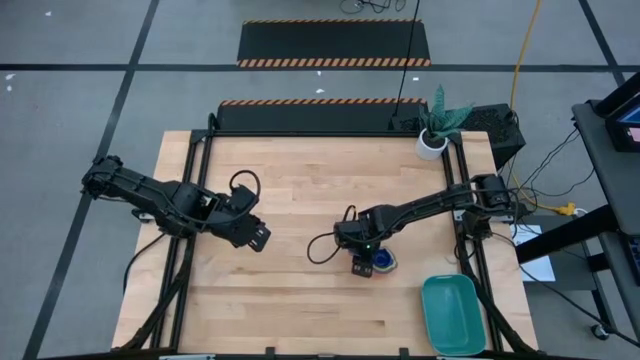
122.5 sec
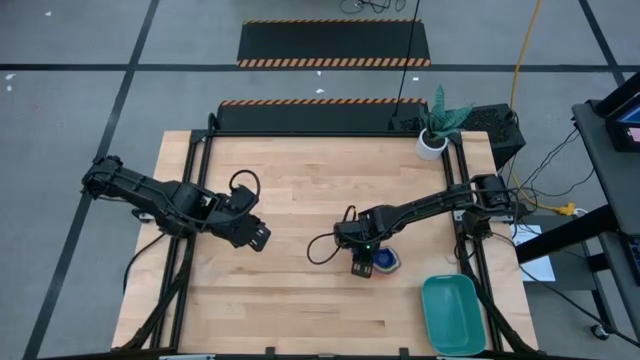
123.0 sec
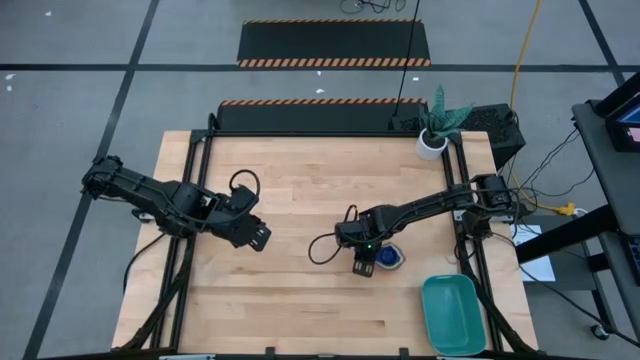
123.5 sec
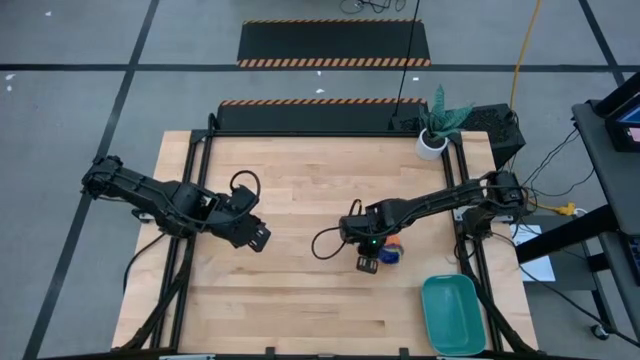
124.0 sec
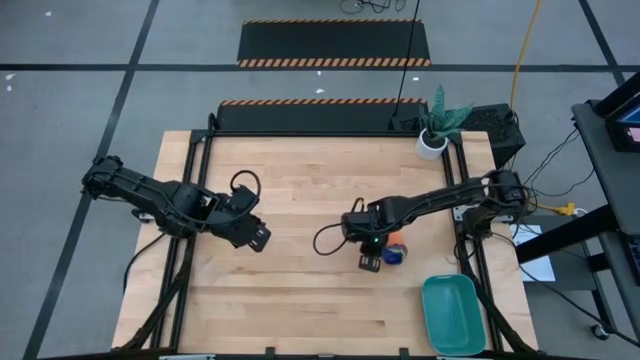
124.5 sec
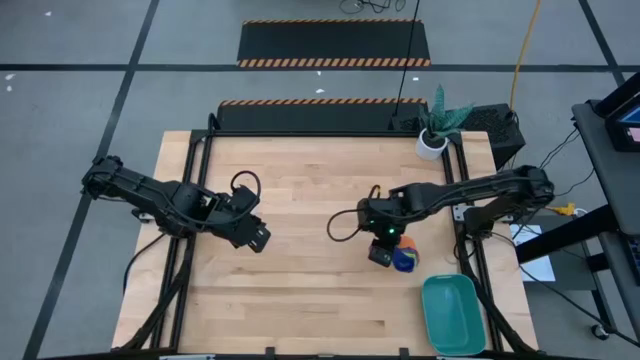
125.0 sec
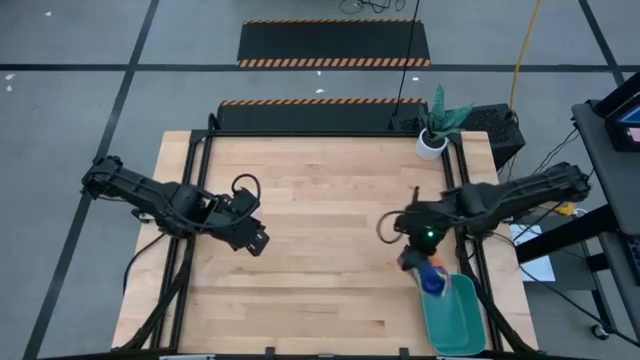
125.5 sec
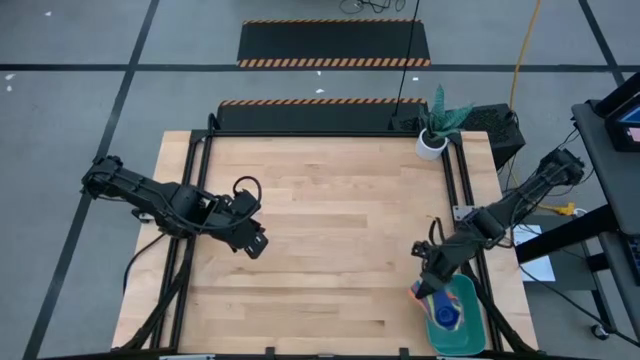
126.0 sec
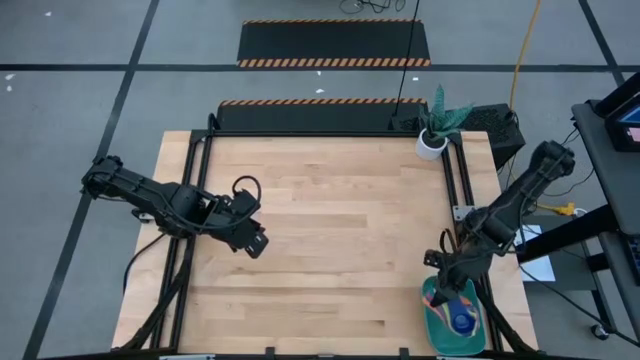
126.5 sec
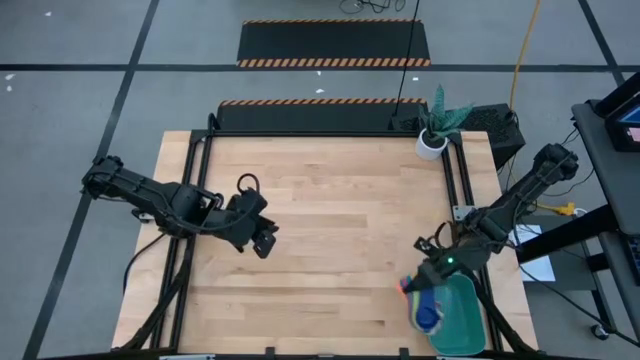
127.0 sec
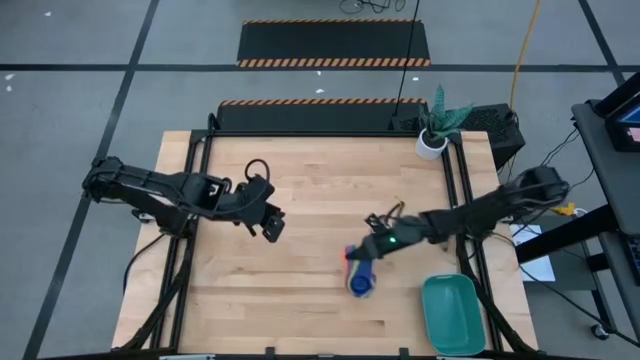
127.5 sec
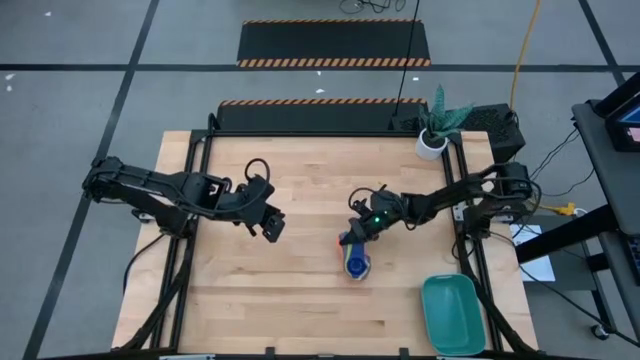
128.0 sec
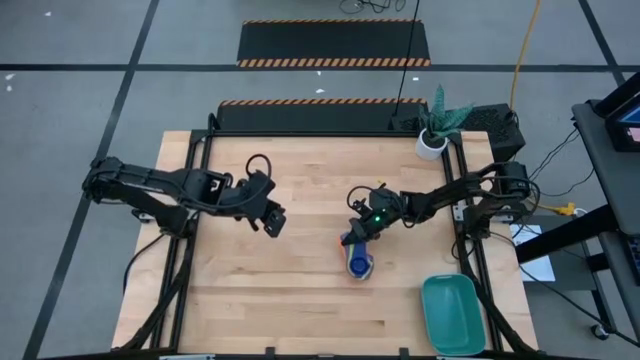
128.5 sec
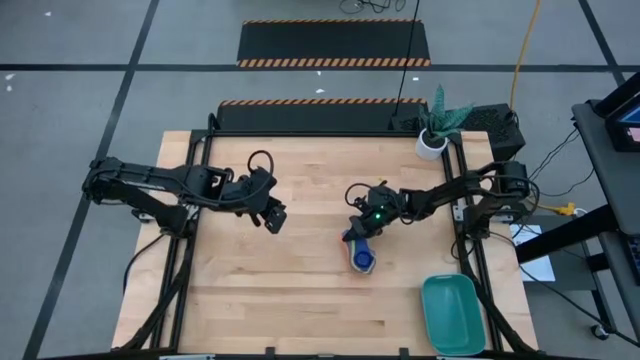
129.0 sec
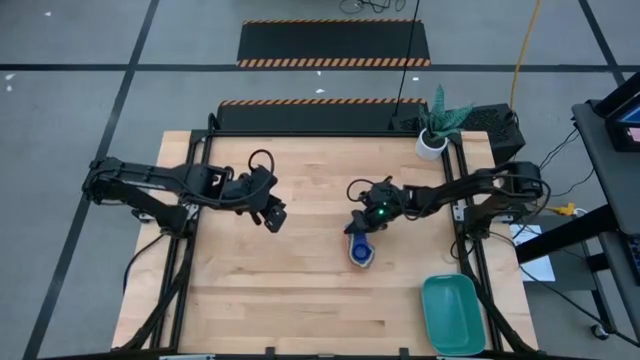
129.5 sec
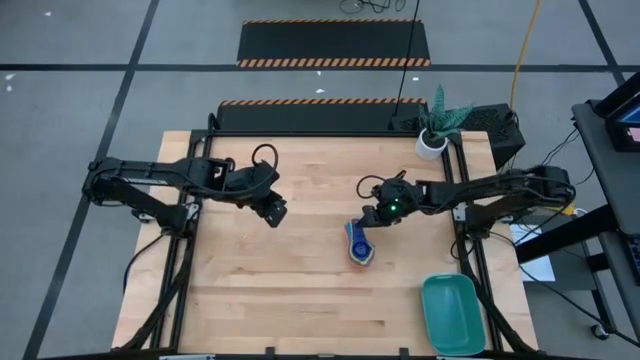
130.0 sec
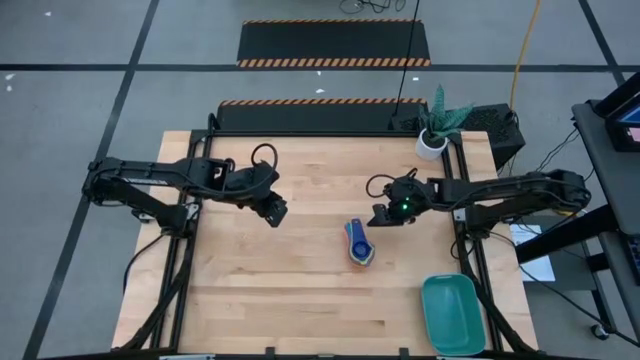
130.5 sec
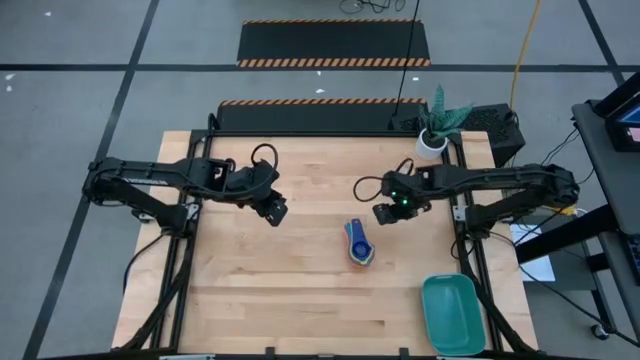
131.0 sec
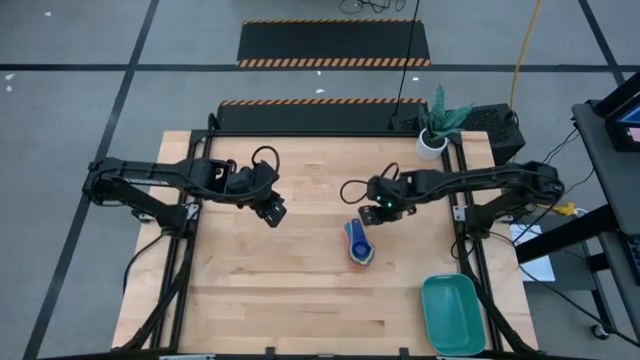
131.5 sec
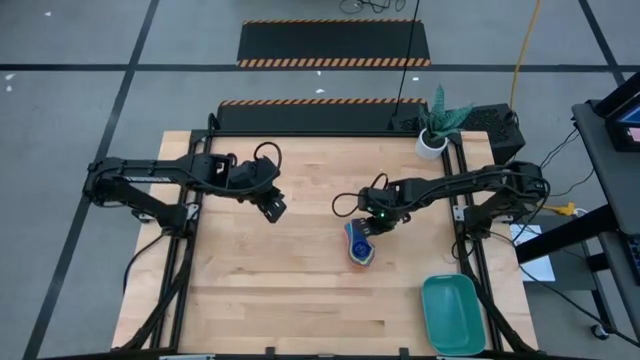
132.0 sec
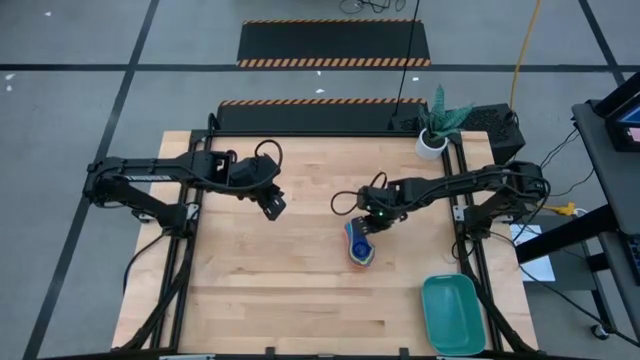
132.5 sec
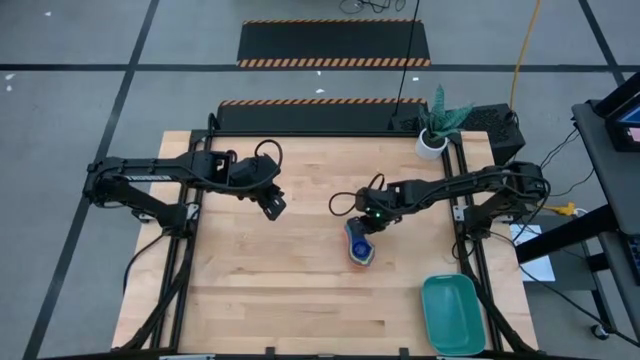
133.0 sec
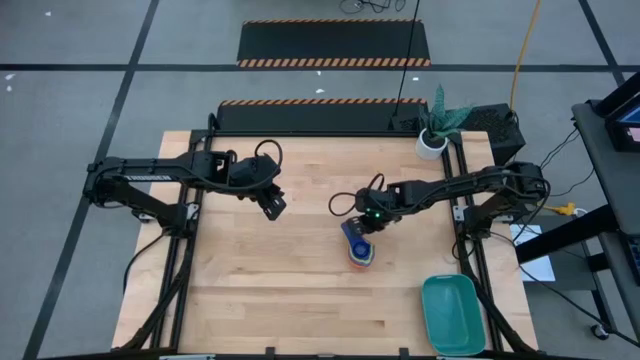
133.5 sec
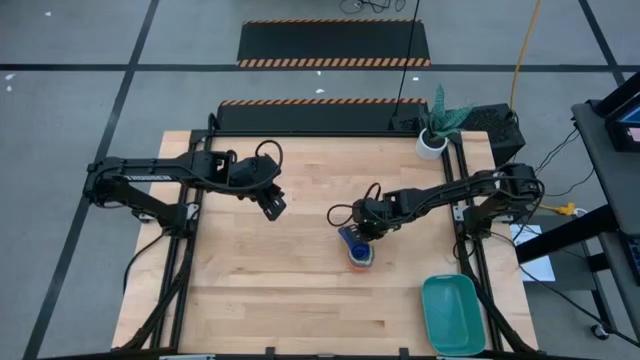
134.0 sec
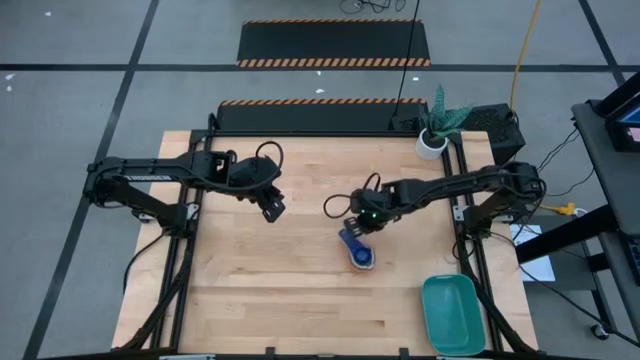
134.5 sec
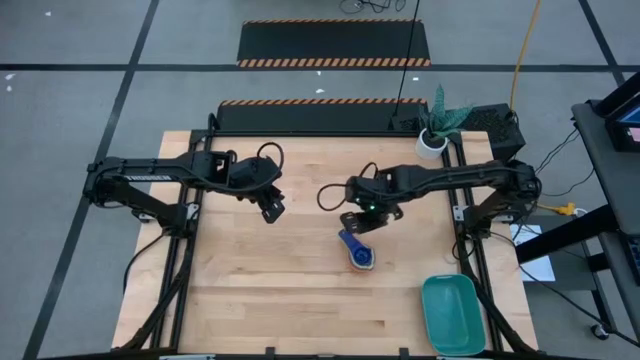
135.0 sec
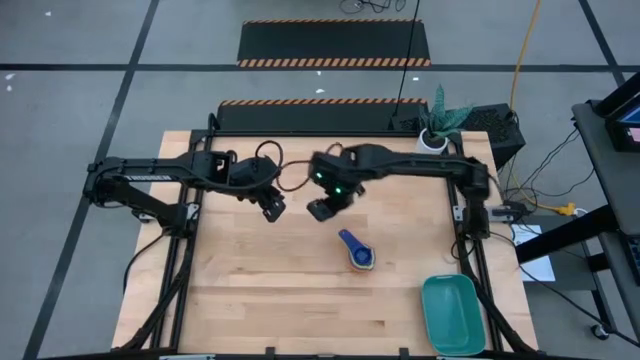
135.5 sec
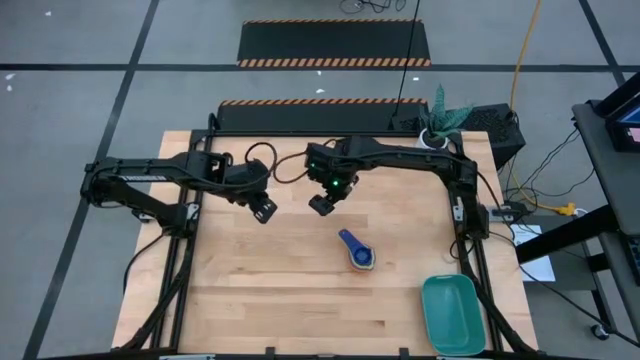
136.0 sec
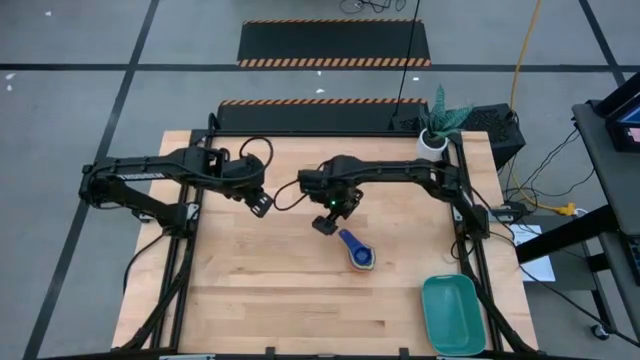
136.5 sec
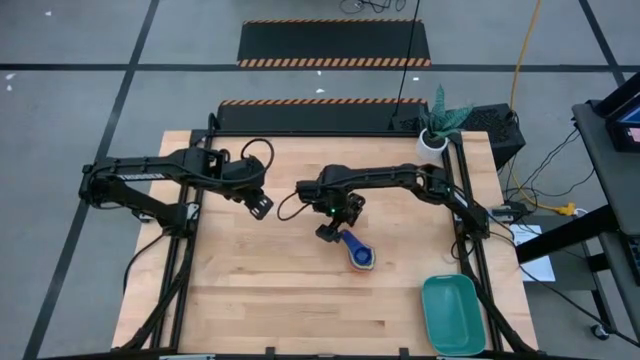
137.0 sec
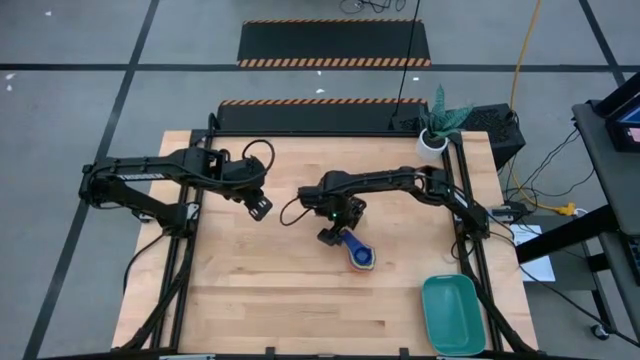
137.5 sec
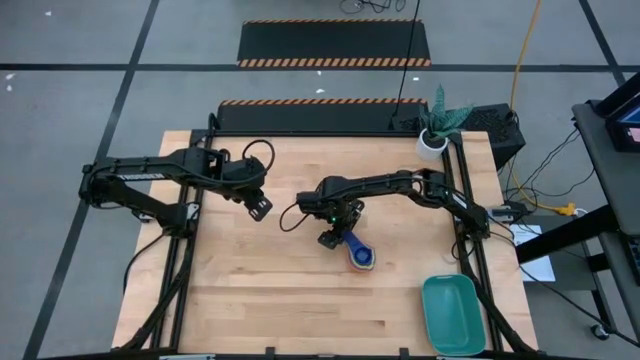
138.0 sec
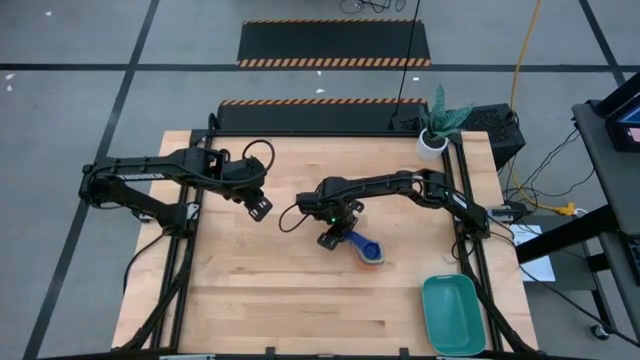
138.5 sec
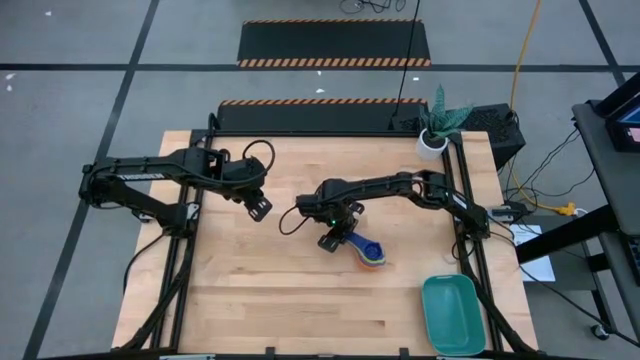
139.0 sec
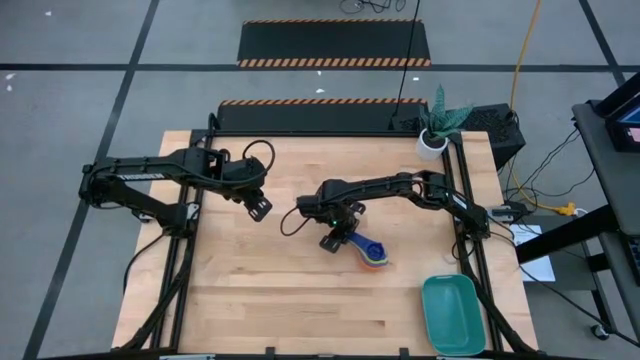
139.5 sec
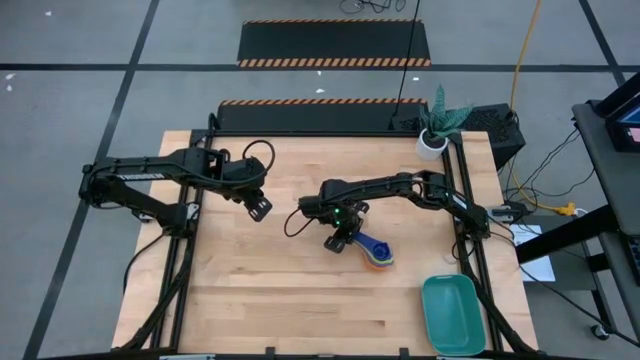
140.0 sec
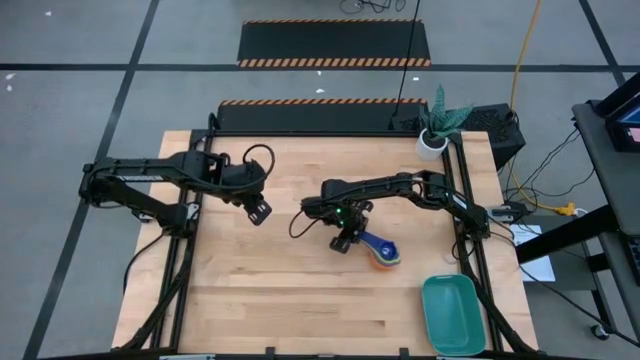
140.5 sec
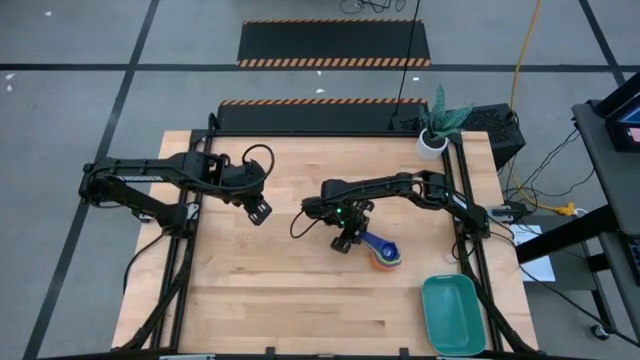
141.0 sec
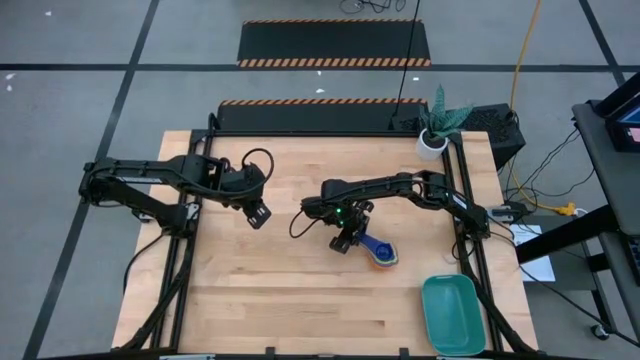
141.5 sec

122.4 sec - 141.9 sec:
Task: Nest measuring cups in basket
Put the stacked measuring cups into the green bin

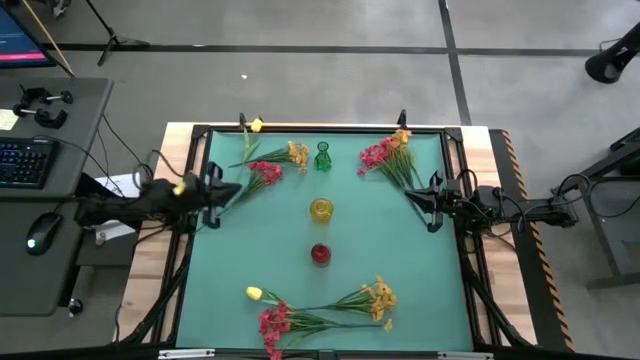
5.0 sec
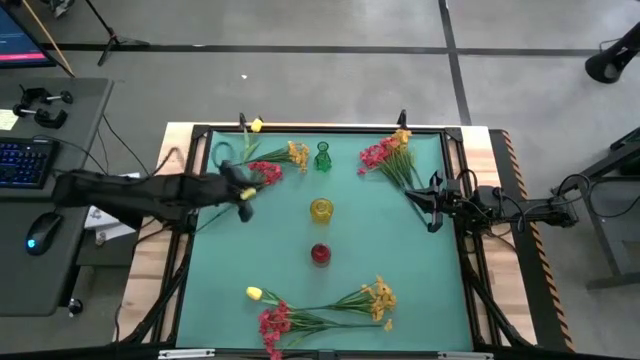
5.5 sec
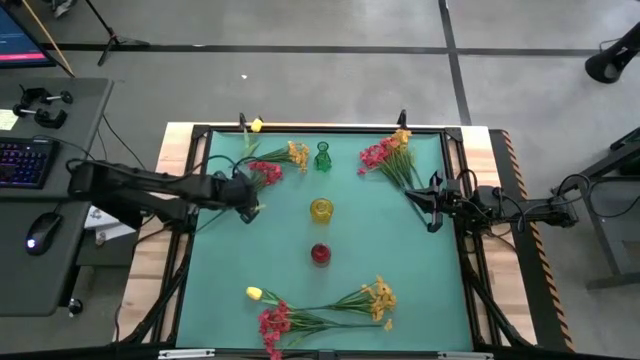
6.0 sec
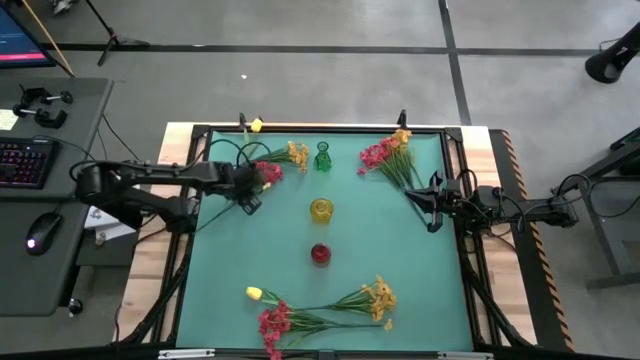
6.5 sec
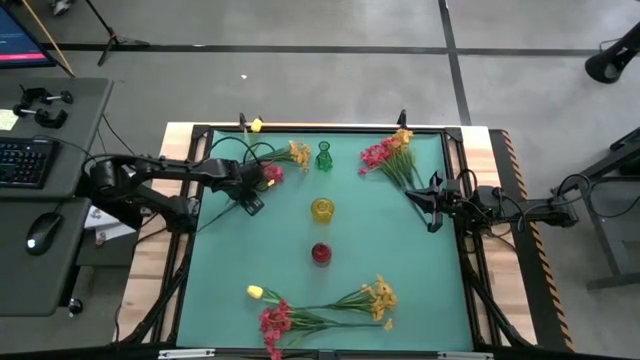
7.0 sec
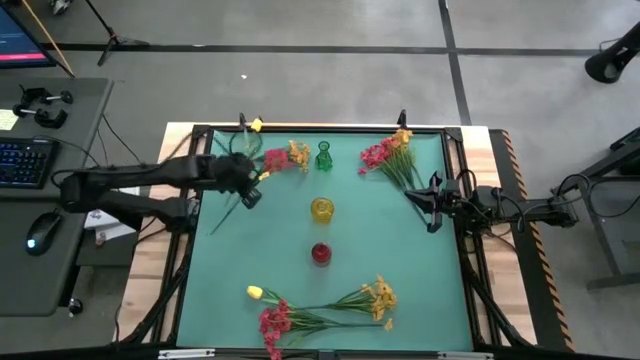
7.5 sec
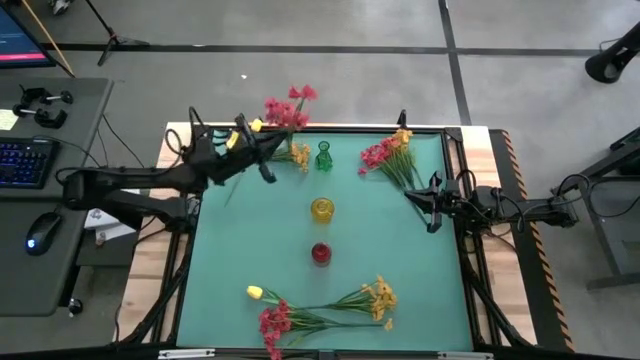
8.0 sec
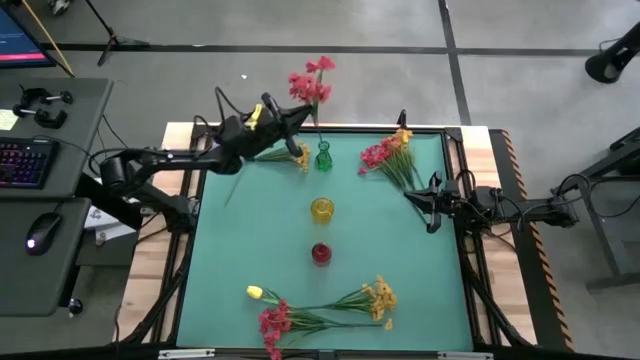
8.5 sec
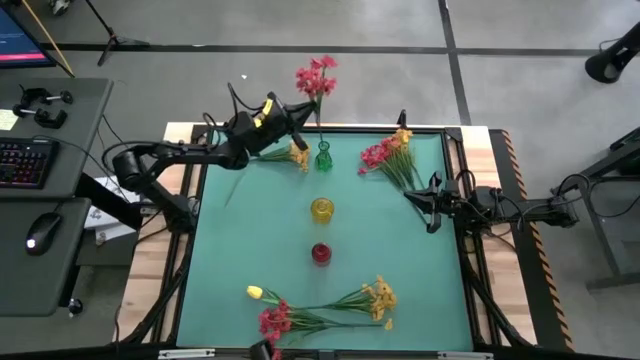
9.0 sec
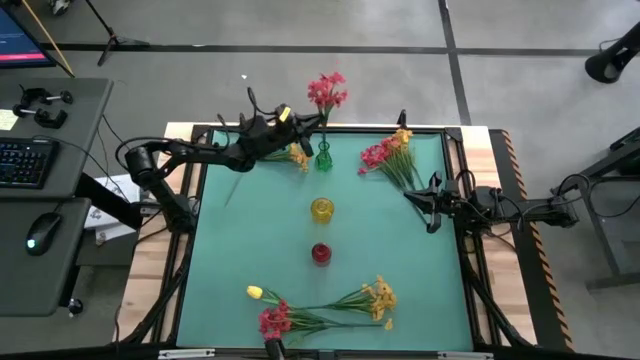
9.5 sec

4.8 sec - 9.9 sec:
Task: Sort flowers into vase by color
Put the top left pink flowers into the green vase
